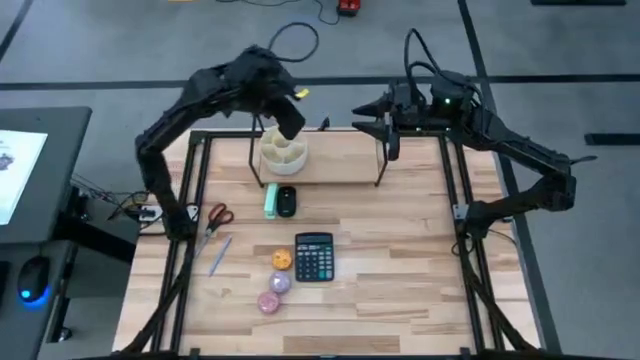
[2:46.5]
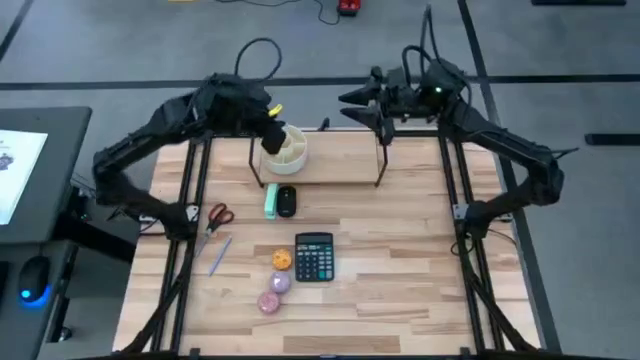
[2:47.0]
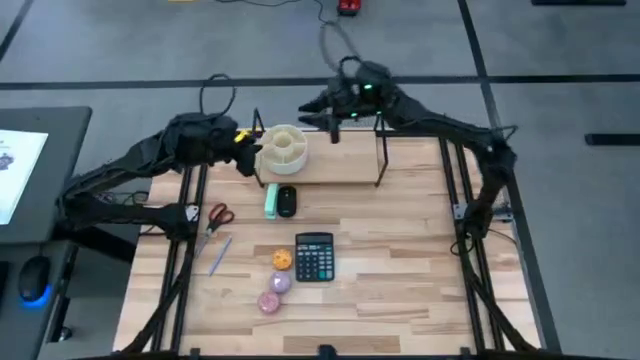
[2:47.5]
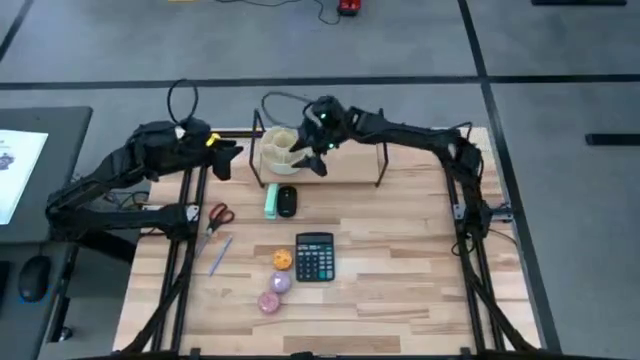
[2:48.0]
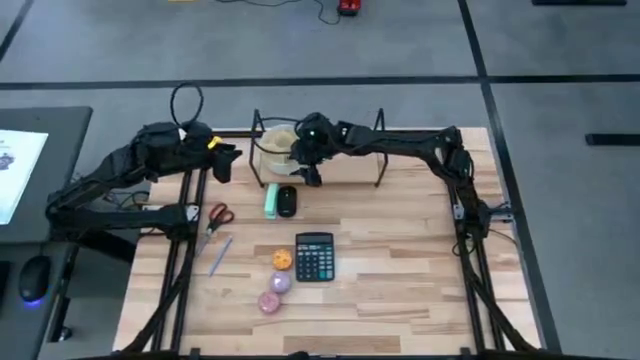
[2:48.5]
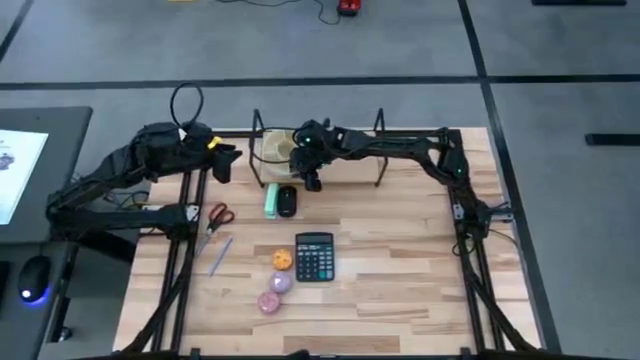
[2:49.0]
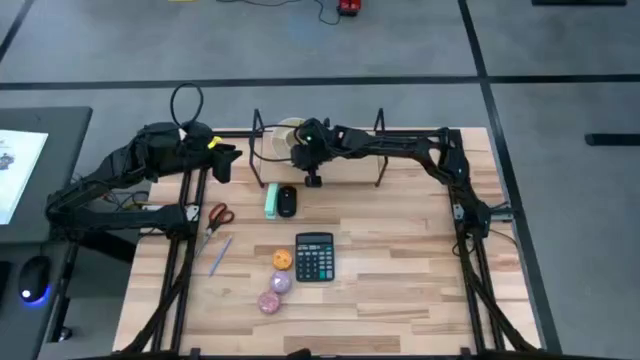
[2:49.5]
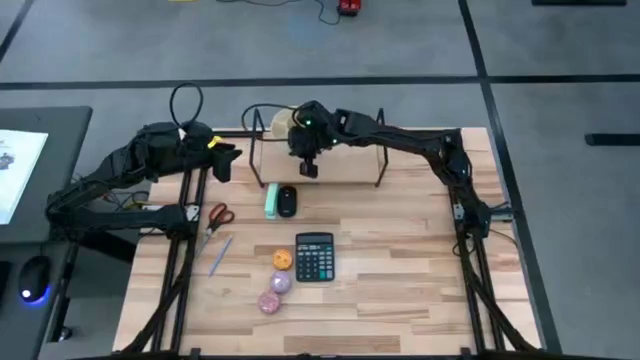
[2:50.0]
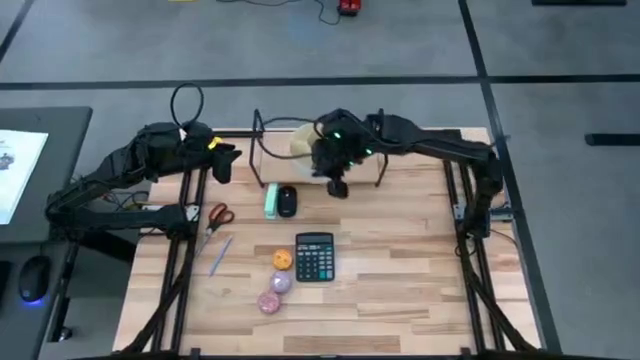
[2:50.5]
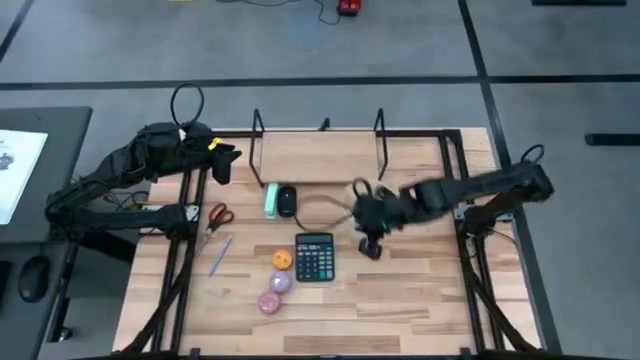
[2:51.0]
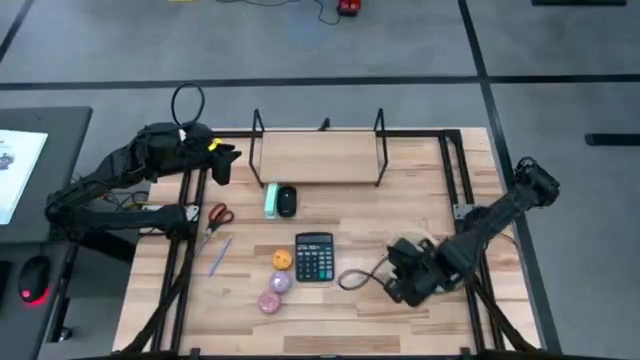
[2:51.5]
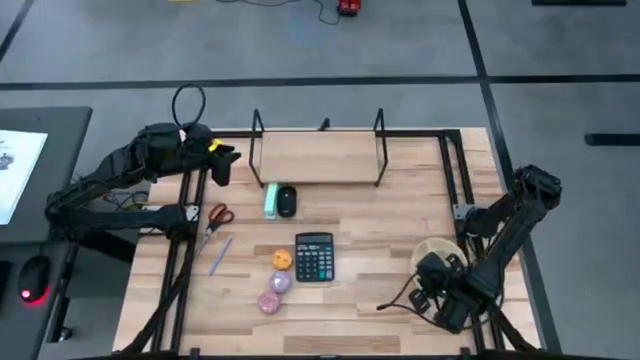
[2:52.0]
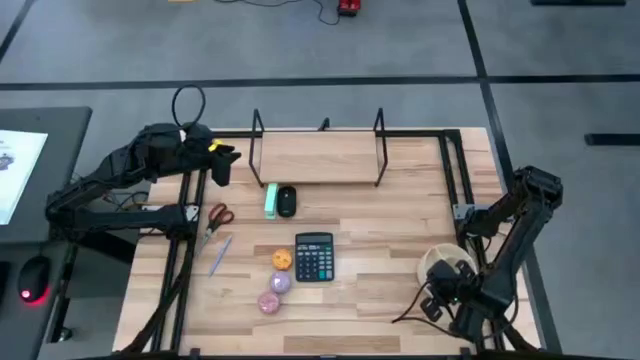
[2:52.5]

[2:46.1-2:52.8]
Task: Stock shelves
Remove the white pen organizer from the shelf

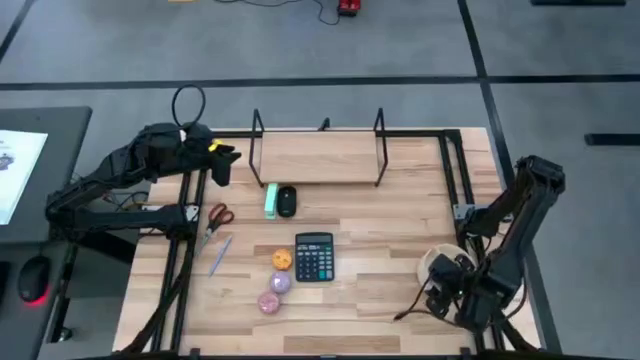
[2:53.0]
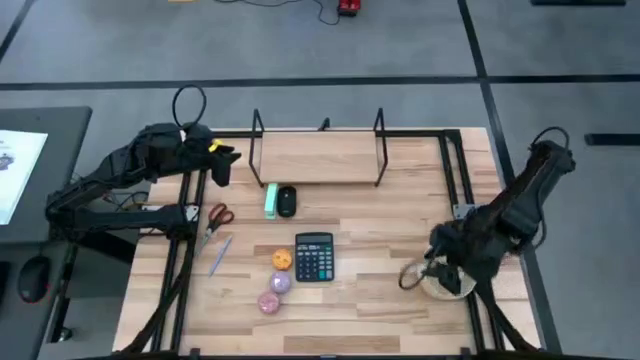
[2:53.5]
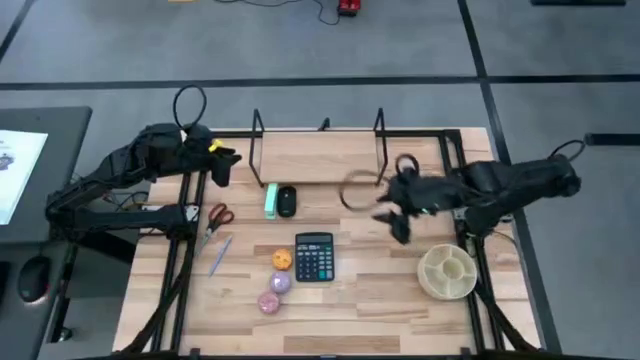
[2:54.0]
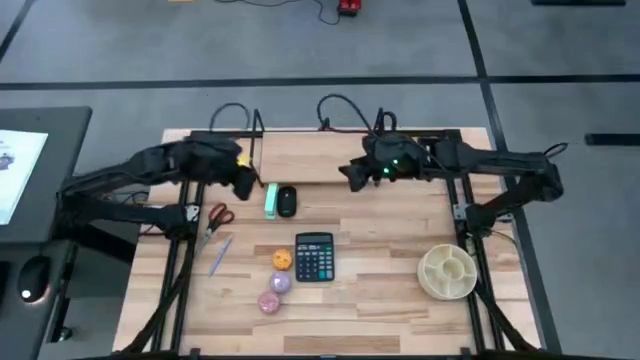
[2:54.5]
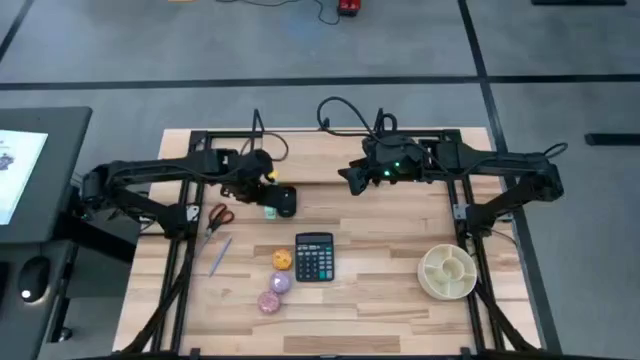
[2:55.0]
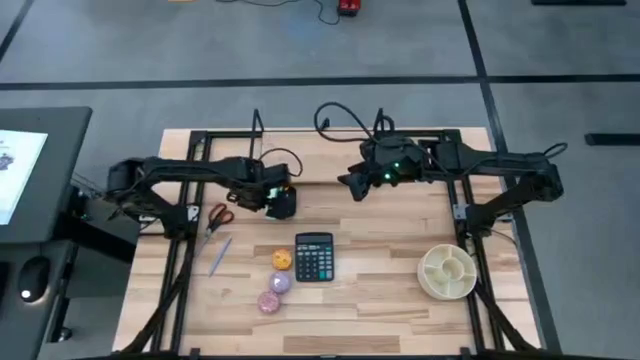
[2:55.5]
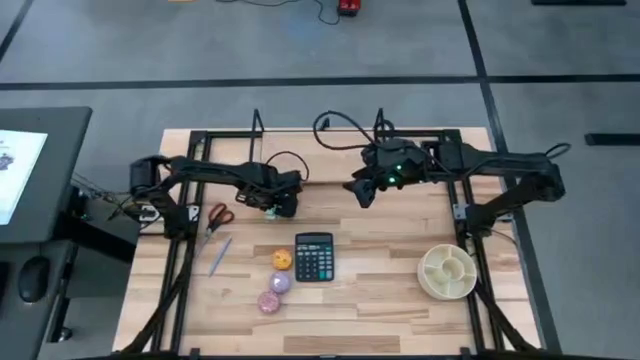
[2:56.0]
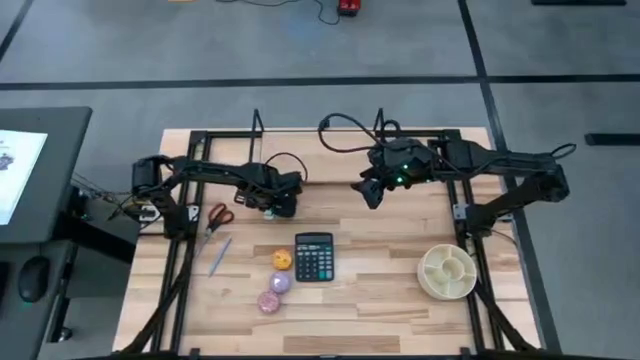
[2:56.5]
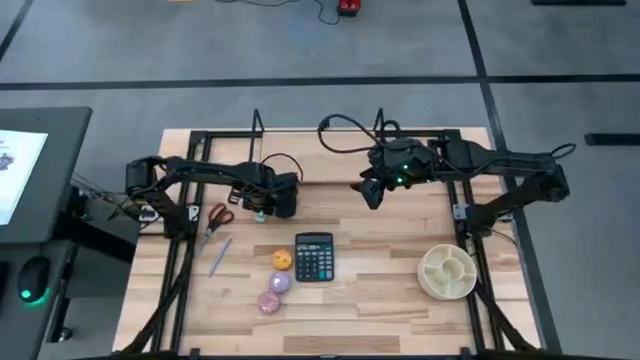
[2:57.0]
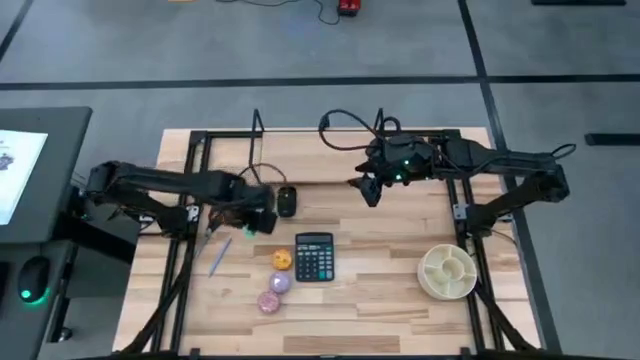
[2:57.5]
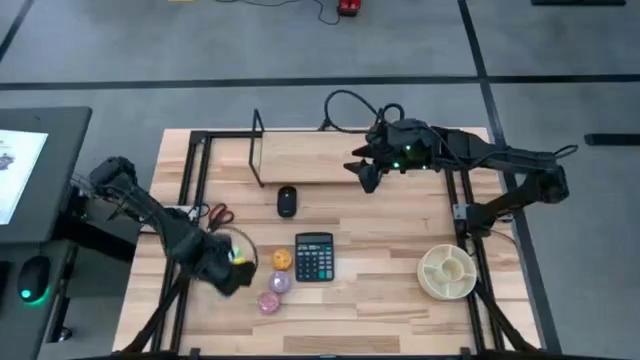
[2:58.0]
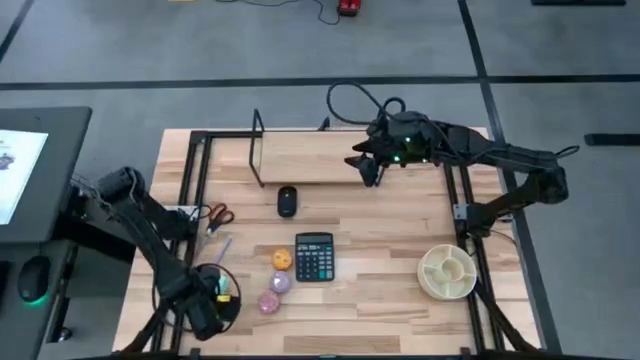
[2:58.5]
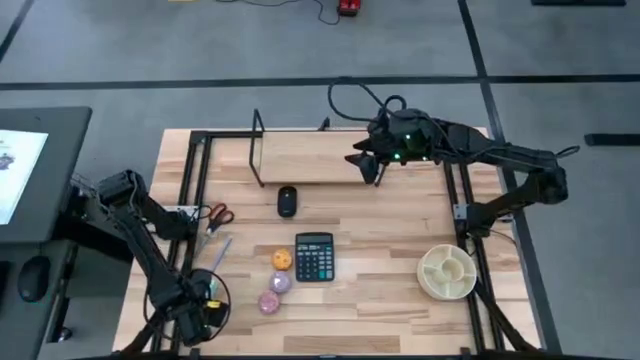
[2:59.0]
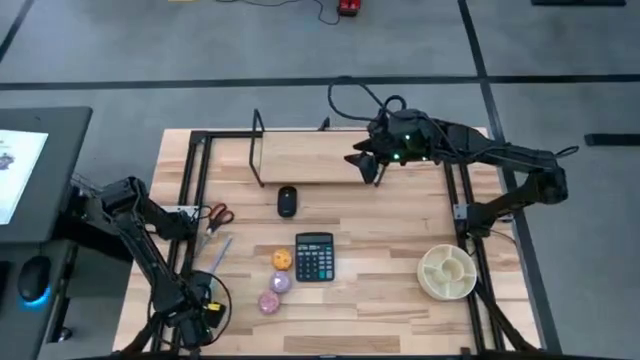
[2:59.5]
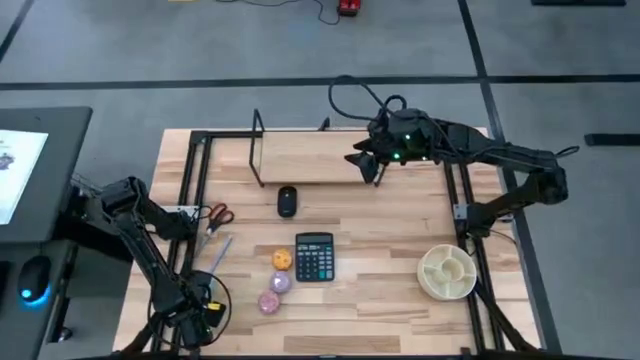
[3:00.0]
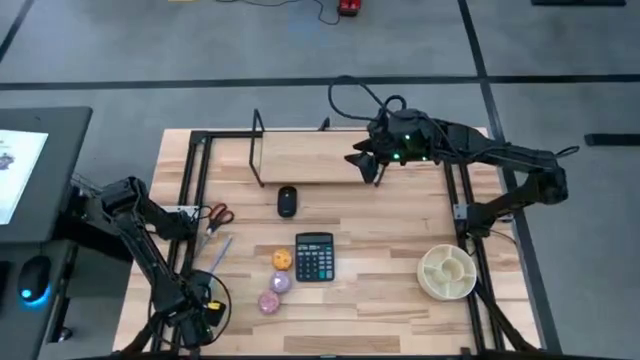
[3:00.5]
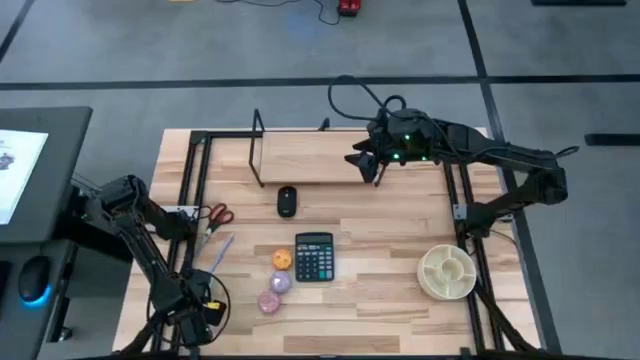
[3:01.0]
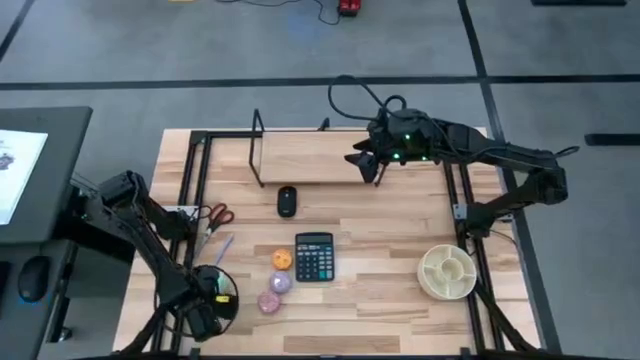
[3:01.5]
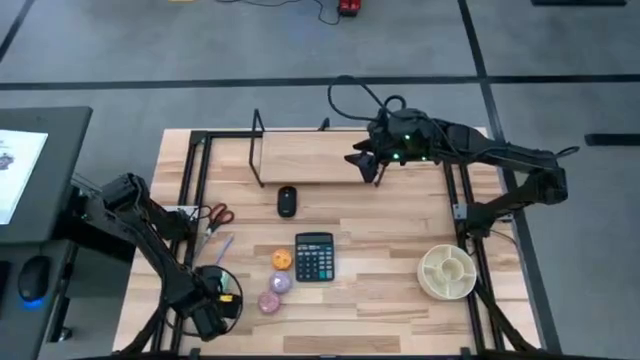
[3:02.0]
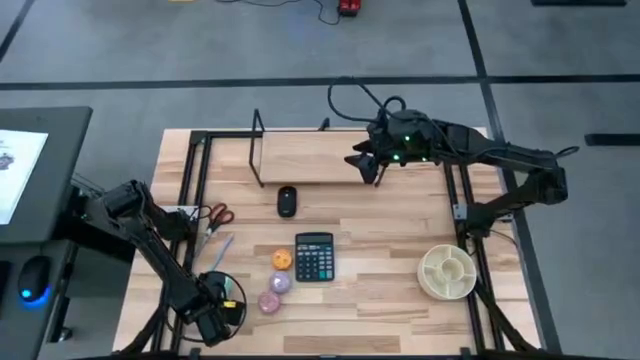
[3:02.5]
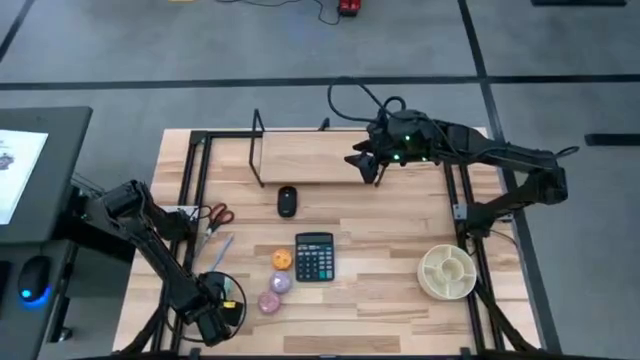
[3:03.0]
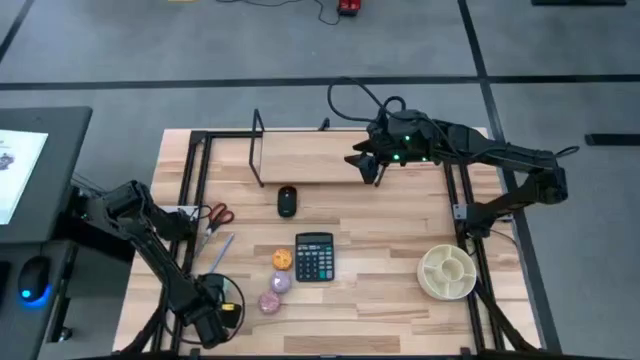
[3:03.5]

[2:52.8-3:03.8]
Remove the light green stapler from the bottom left of the shelf

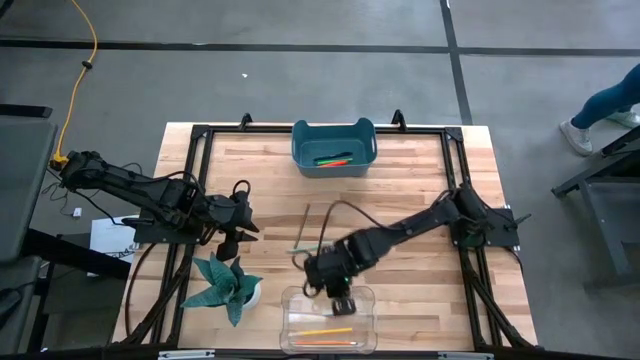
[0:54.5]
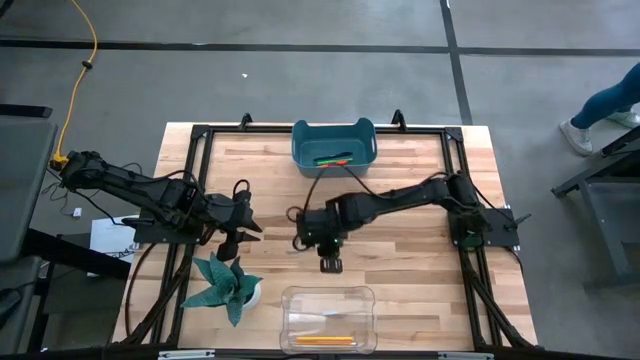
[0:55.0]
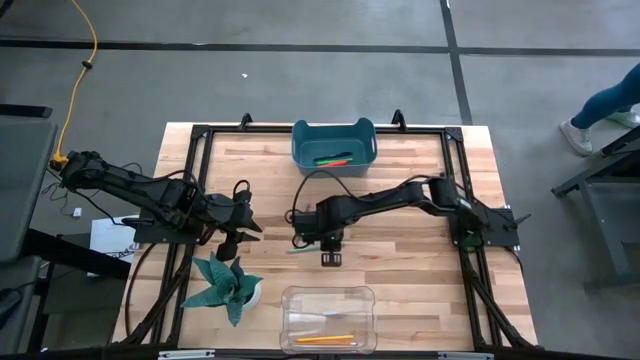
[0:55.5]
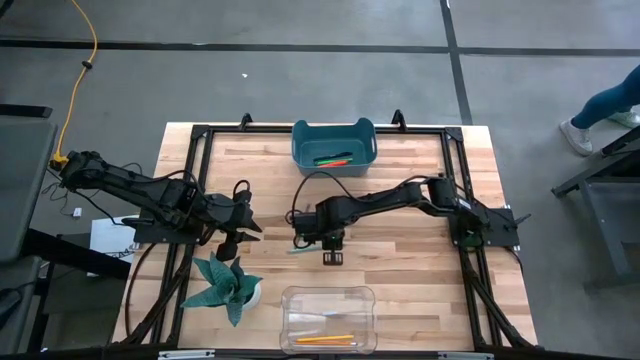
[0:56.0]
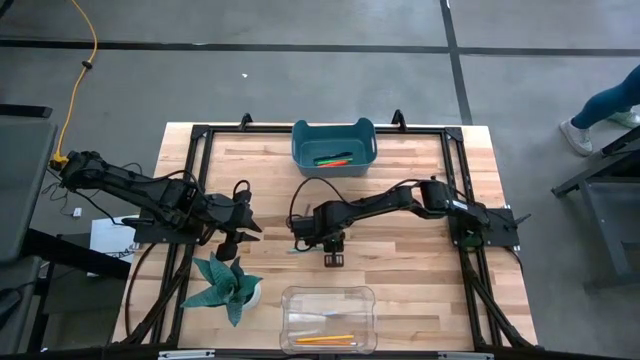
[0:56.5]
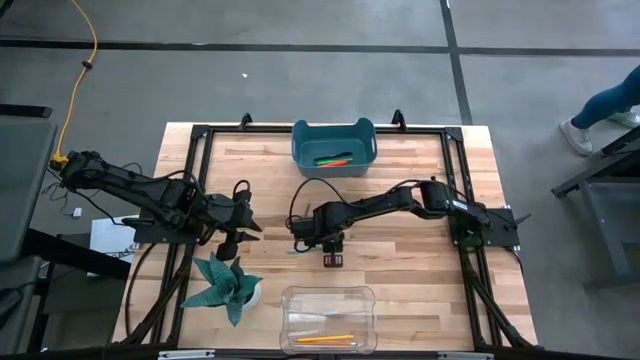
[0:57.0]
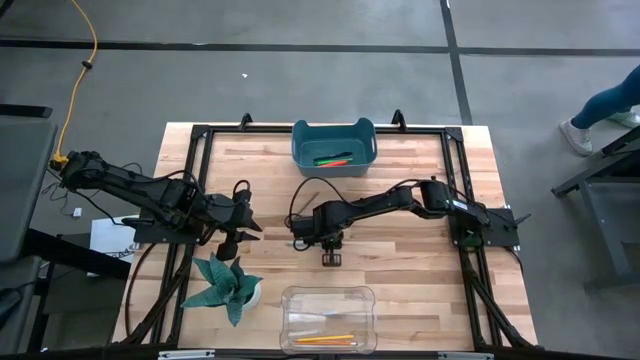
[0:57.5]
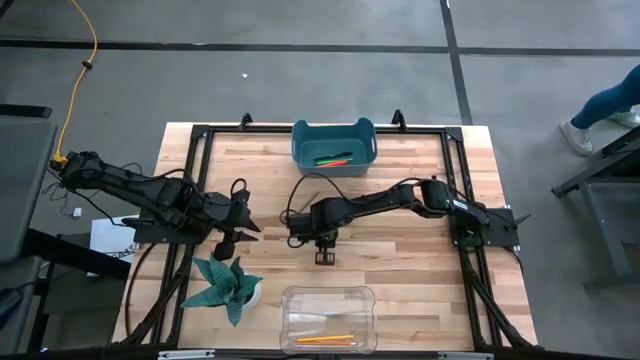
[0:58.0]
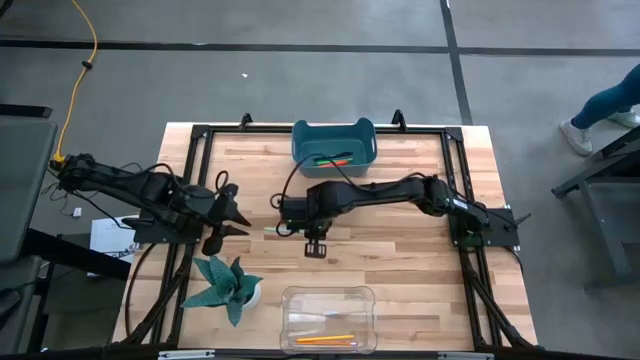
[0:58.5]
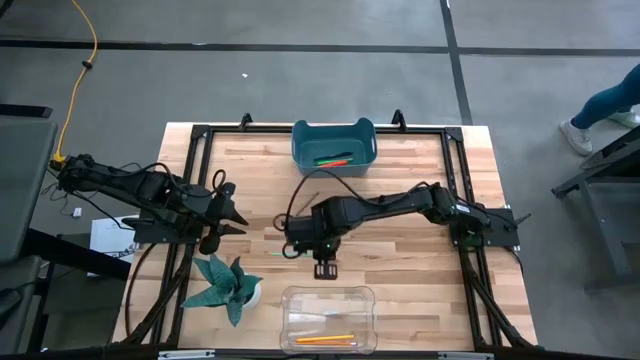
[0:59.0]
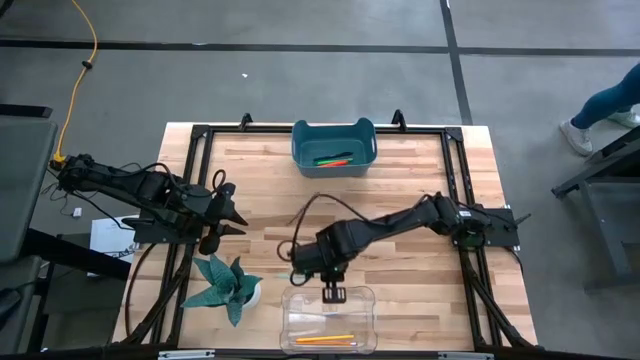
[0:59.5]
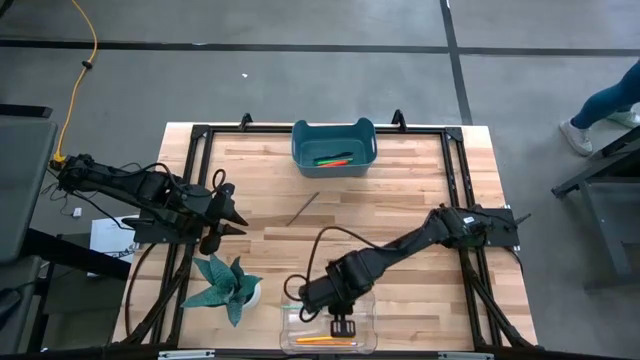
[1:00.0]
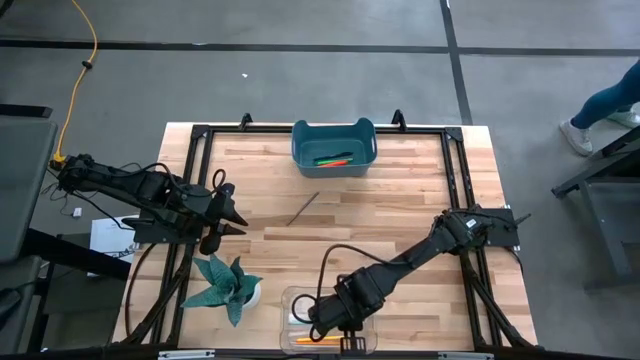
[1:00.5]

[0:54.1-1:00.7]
Task: Sort pens & pencils
Put the light blue pencil into the transparent bin
